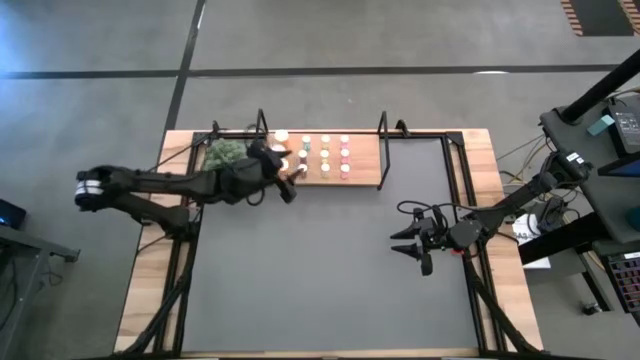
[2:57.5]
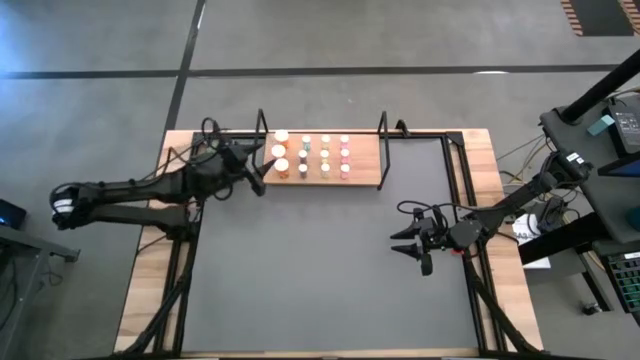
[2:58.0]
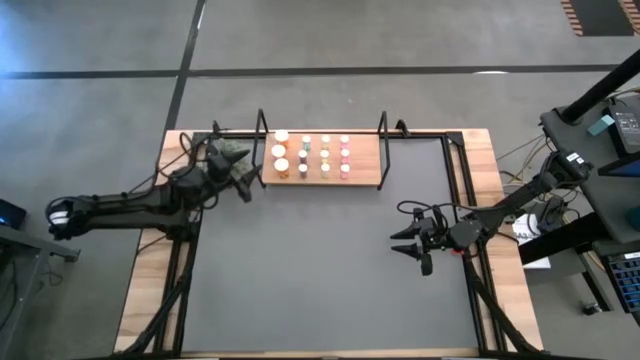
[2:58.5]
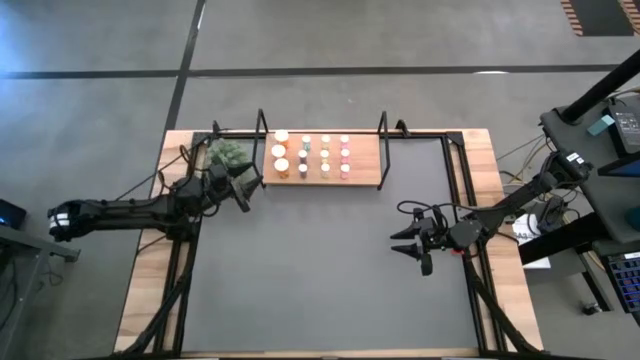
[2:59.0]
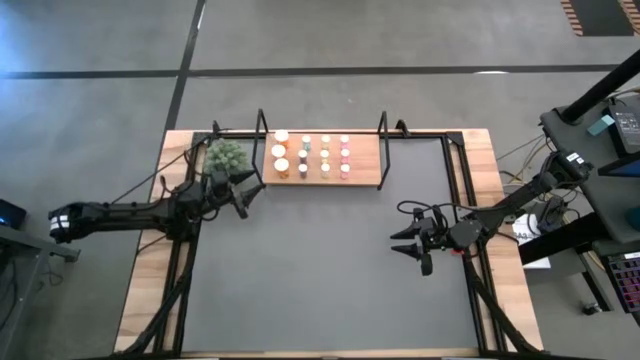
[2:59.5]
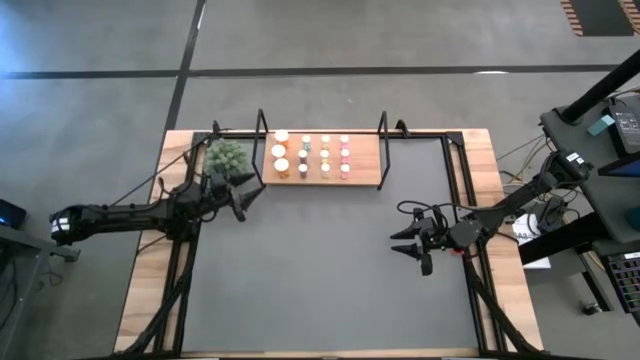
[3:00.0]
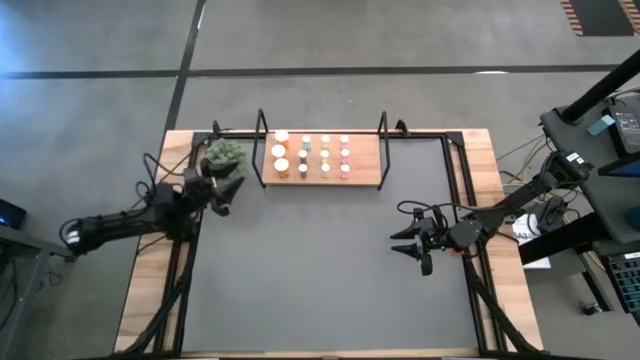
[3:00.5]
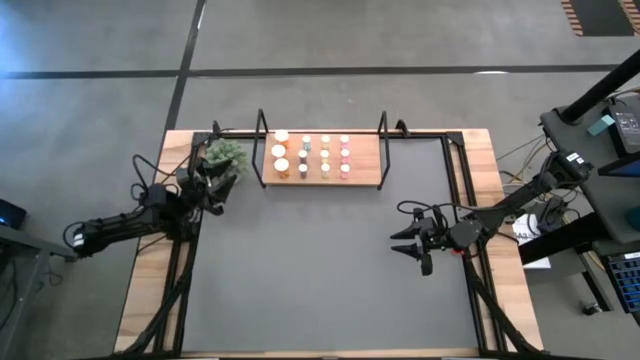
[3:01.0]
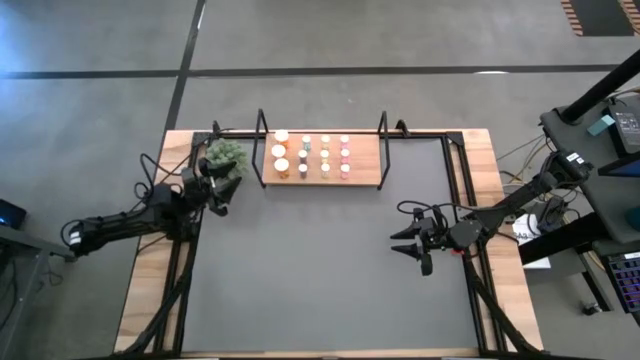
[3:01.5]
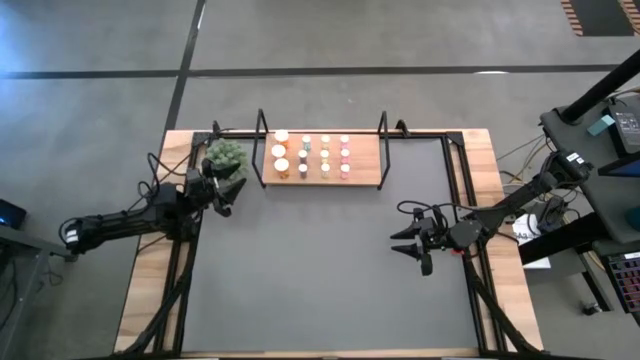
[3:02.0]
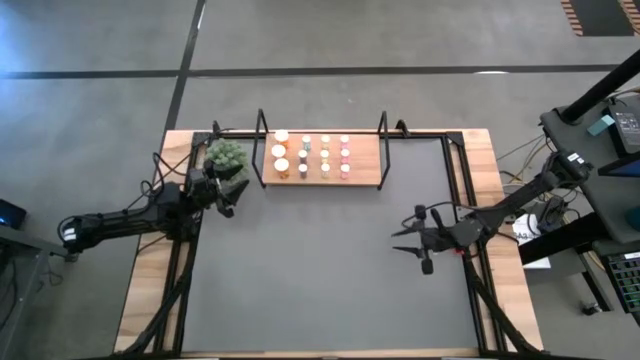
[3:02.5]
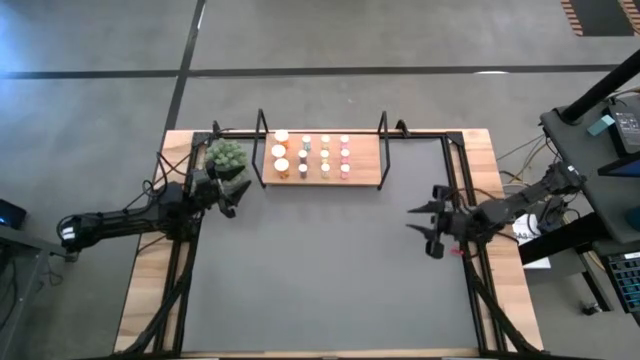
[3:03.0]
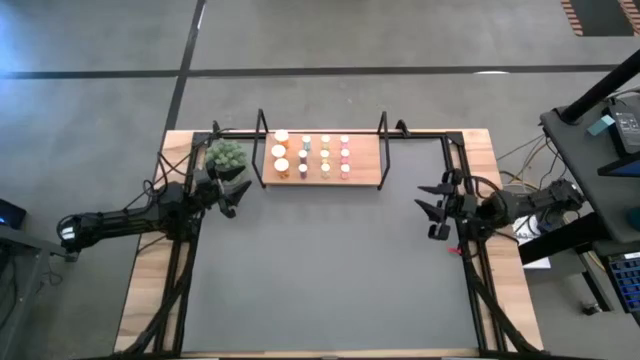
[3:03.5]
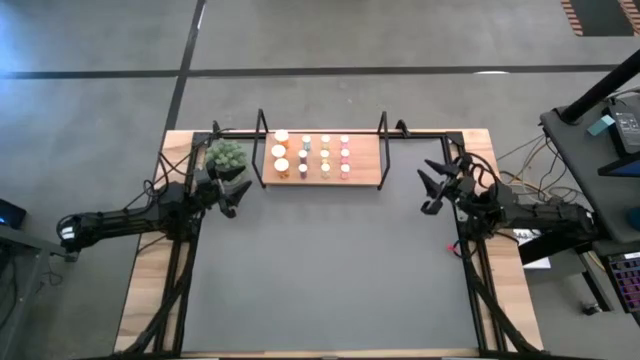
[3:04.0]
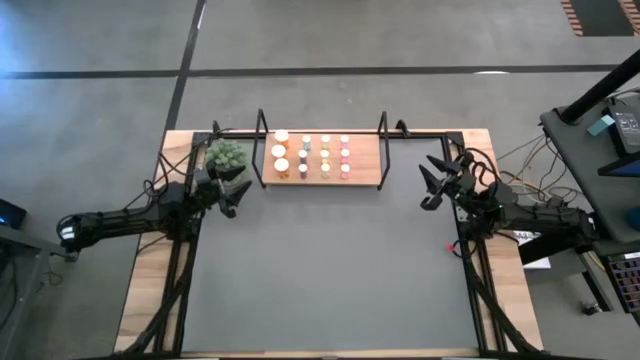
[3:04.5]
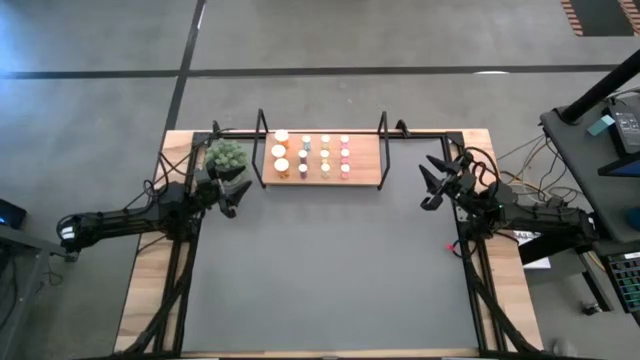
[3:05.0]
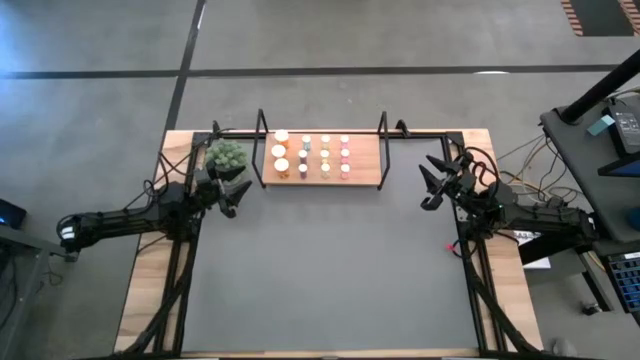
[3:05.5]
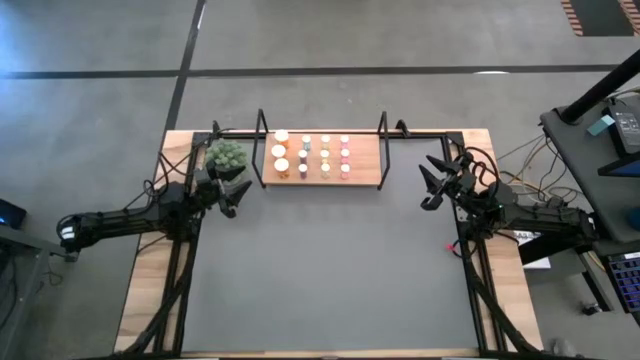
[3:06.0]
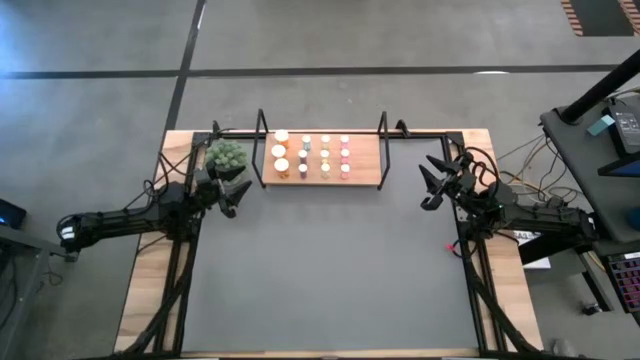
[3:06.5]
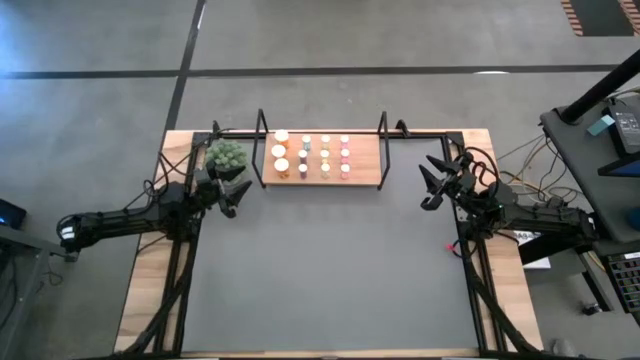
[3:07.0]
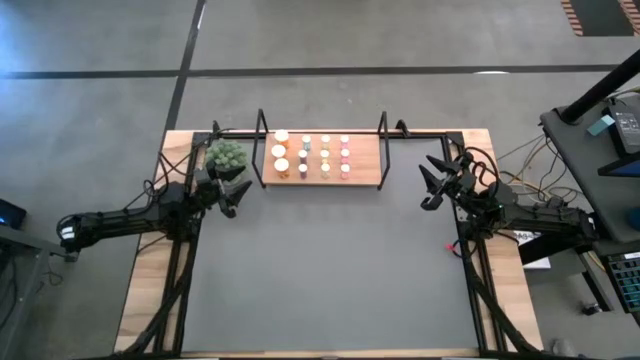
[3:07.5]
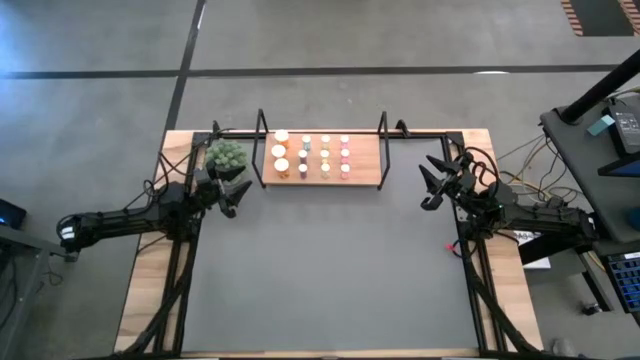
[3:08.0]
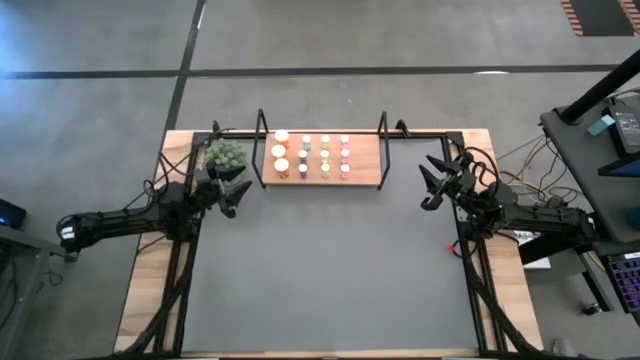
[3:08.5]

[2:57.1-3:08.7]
Task: Pick and place medicine bottles onto shelf by color
Return to Home Position

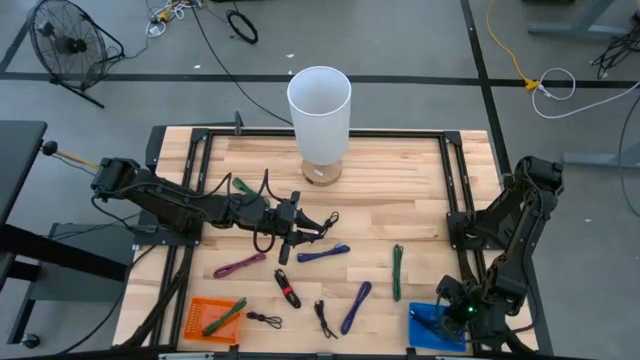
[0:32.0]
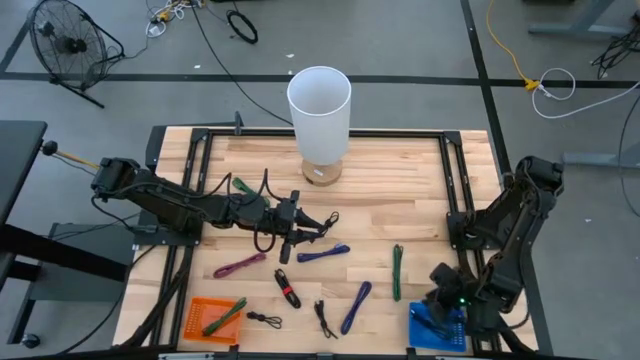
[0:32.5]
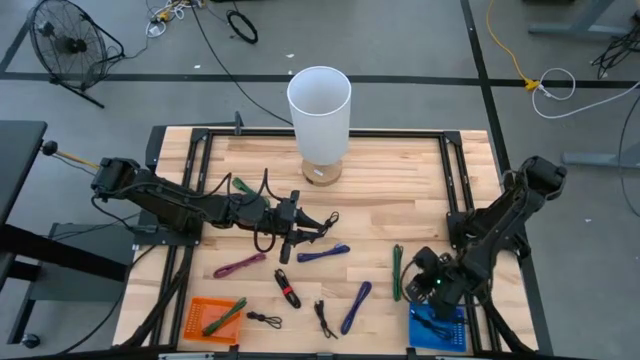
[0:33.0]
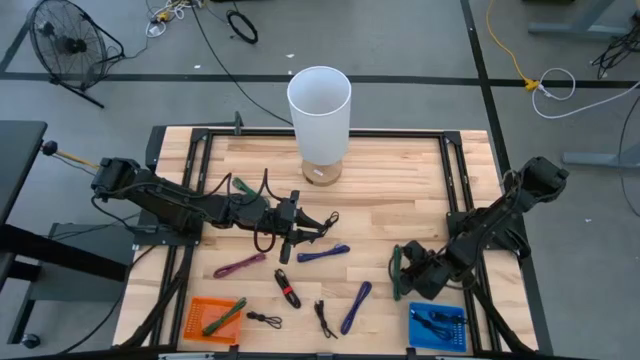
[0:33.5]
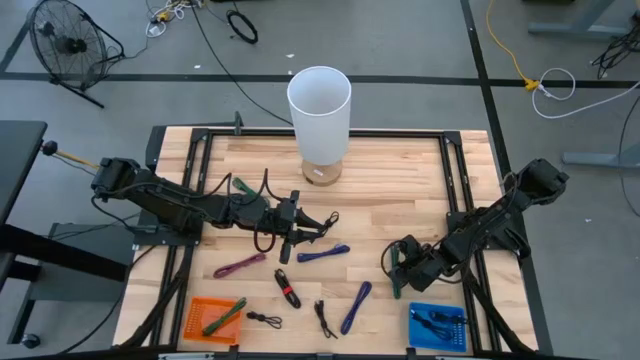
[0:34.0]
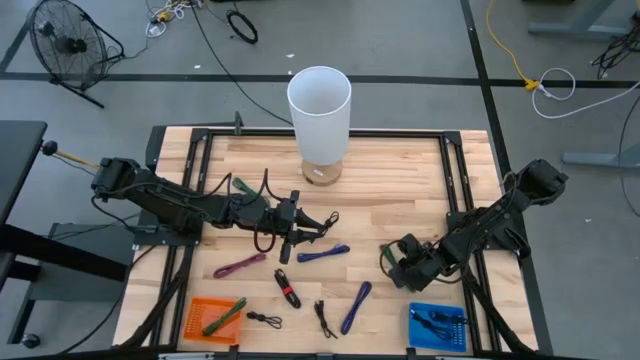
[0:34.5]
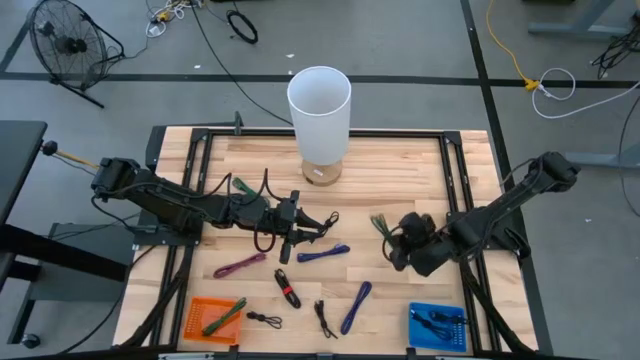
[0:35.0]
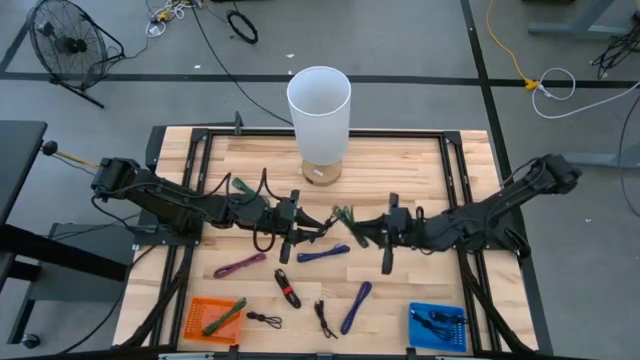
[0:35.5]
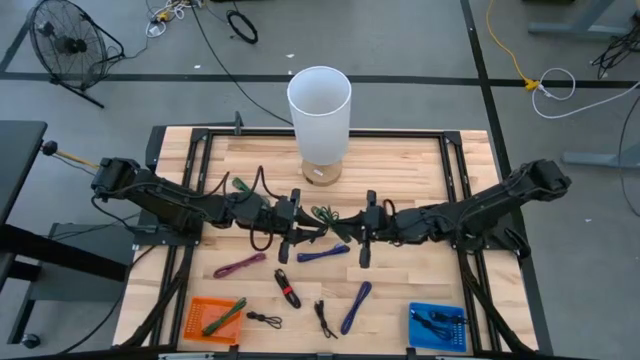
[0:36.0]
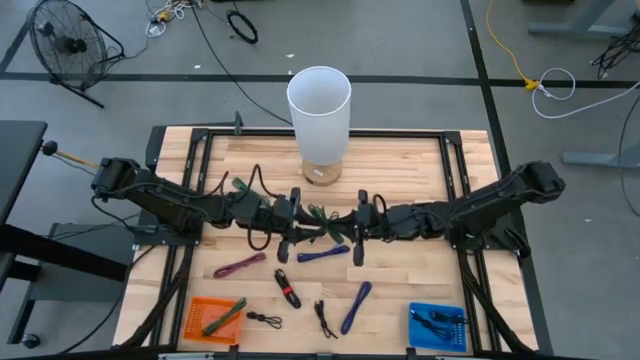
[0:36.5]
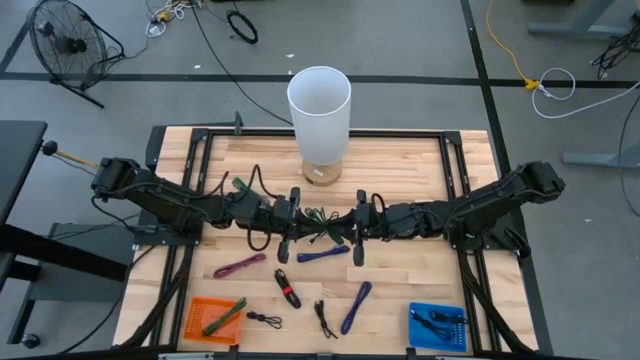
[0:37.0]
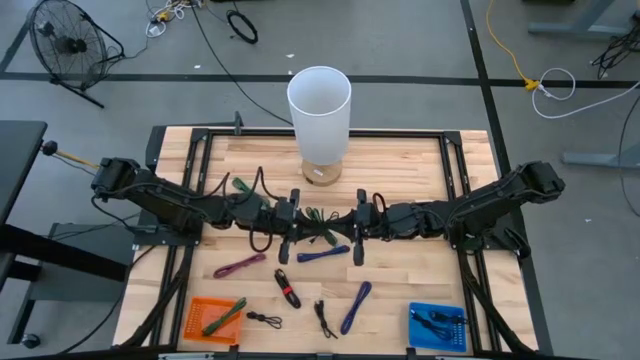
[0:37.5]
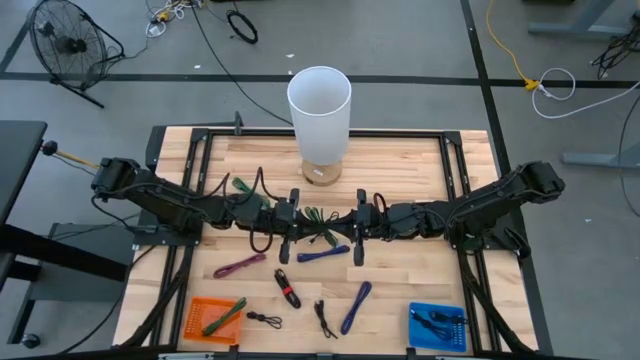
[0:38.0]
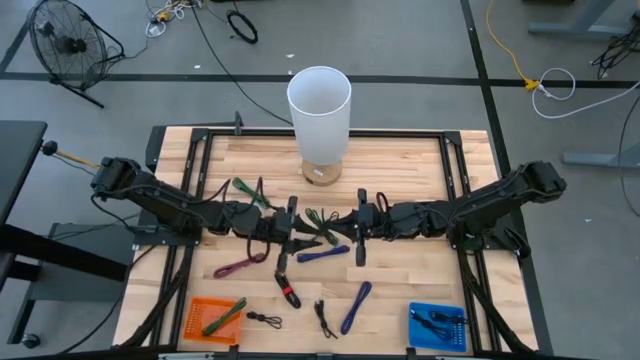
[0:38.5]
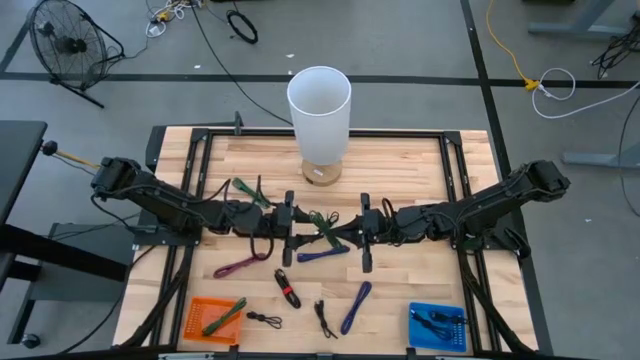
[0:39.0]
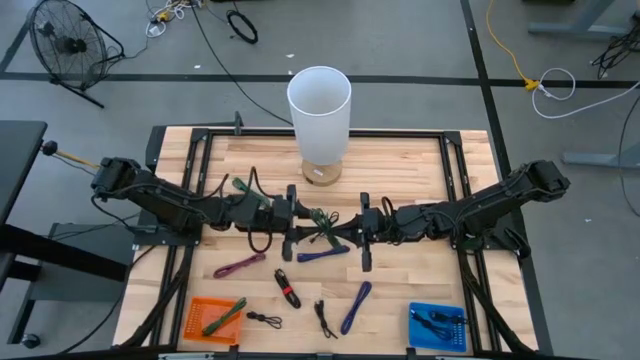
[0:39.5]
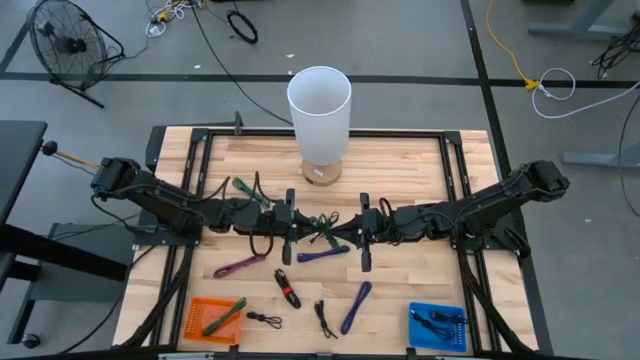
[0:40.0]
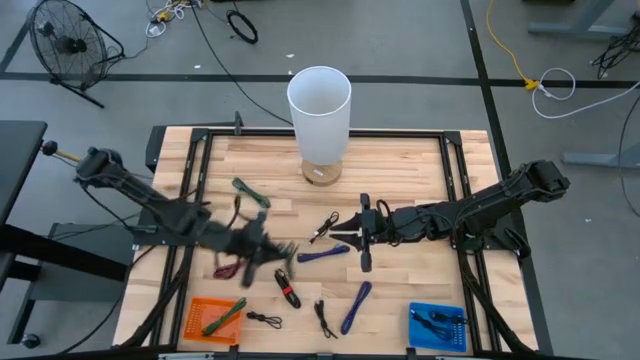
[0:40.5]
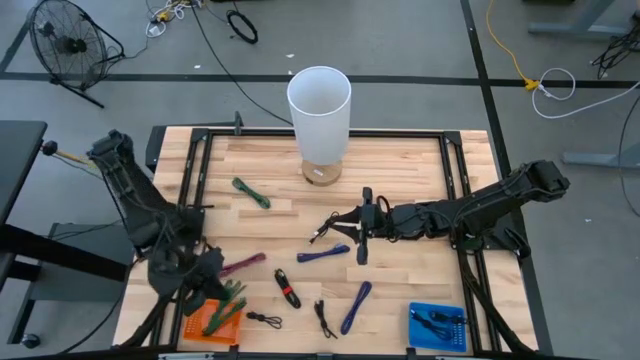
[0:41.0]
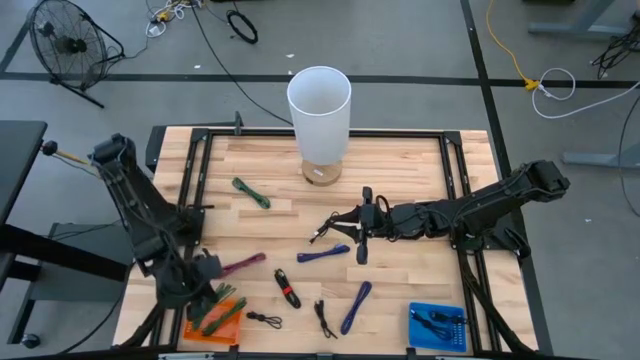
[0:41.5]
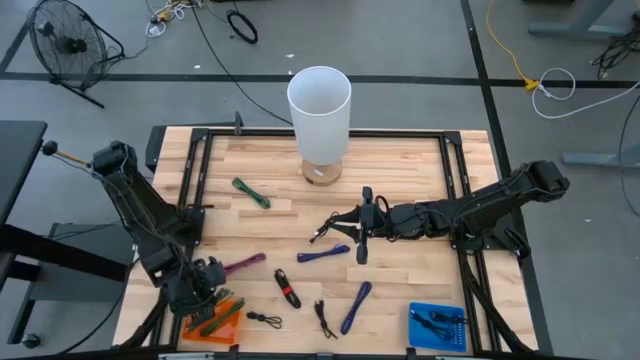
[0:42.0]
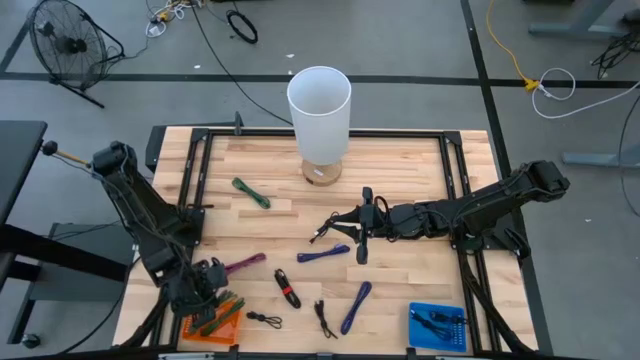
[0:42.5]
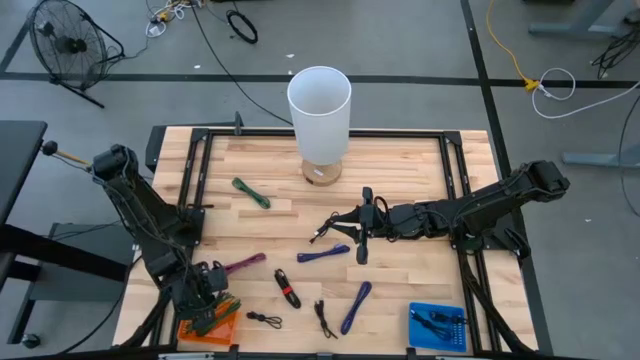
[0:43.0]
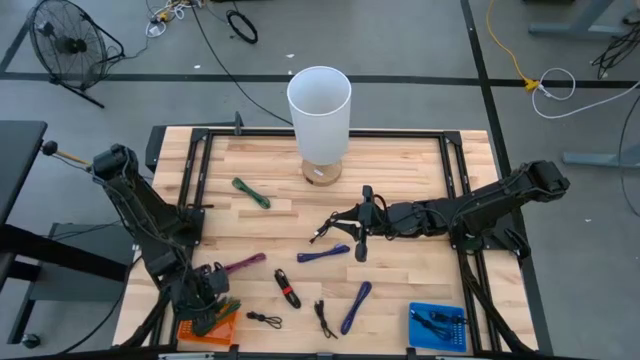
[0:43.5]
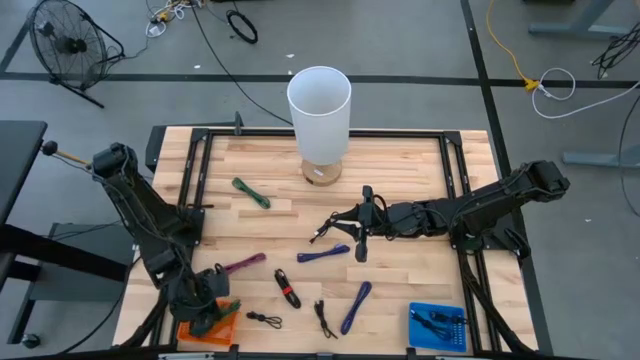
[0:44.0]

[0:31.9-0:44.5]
Task: Pick & Place USB Port
Put the black and green charger cable into the orange bin
